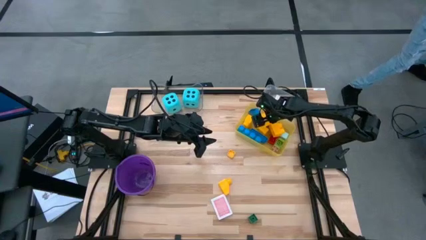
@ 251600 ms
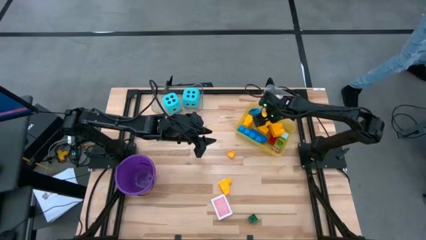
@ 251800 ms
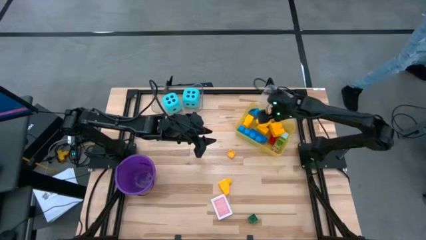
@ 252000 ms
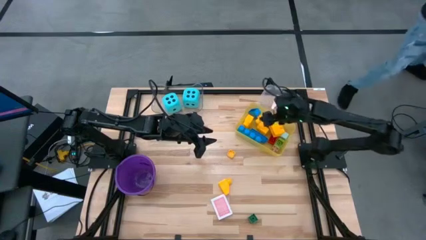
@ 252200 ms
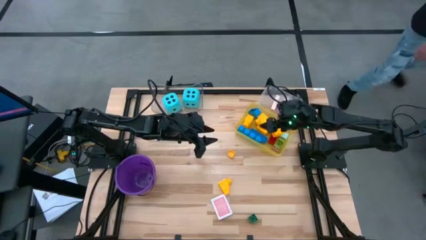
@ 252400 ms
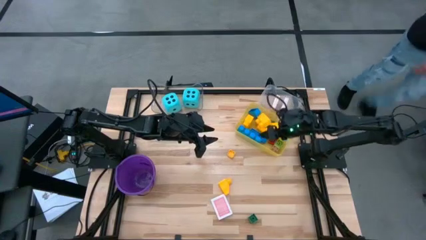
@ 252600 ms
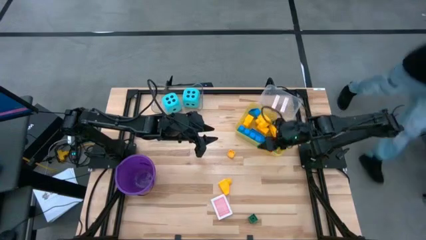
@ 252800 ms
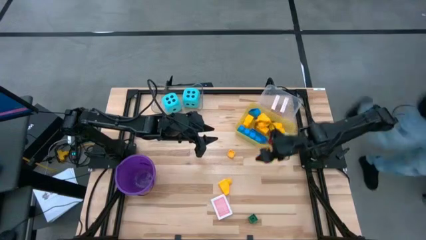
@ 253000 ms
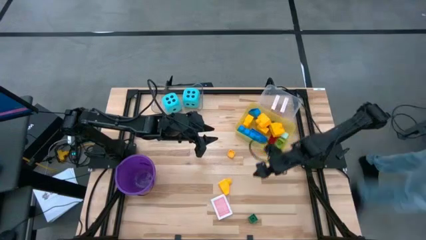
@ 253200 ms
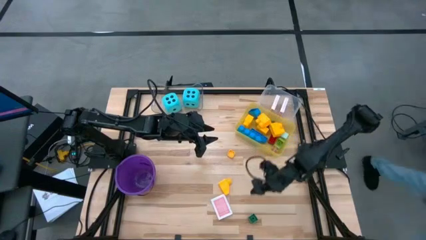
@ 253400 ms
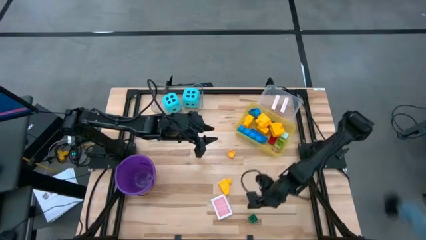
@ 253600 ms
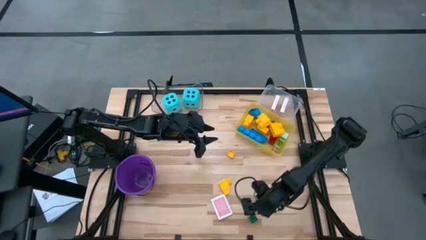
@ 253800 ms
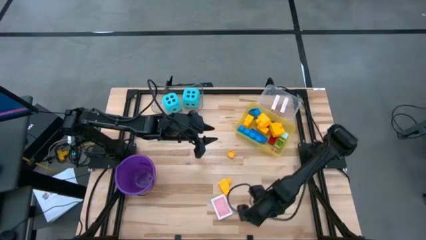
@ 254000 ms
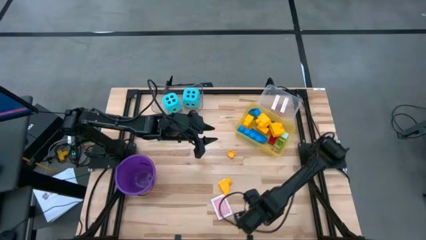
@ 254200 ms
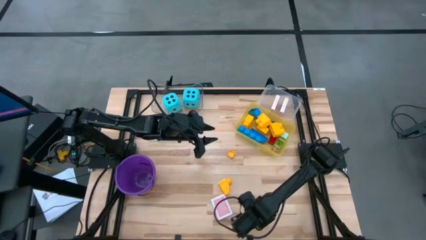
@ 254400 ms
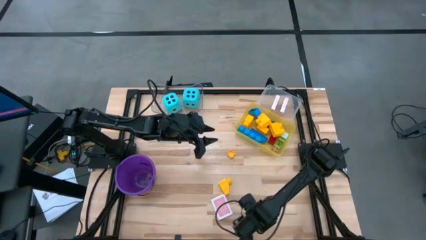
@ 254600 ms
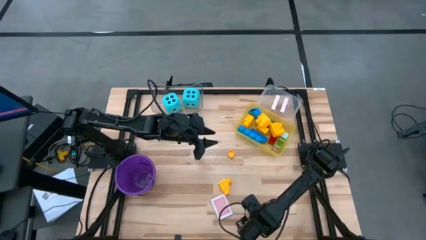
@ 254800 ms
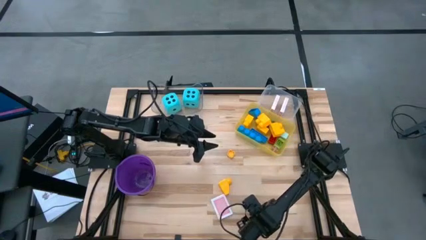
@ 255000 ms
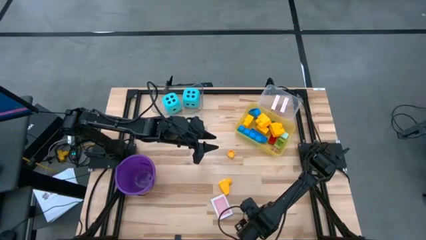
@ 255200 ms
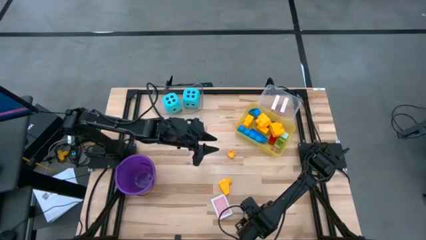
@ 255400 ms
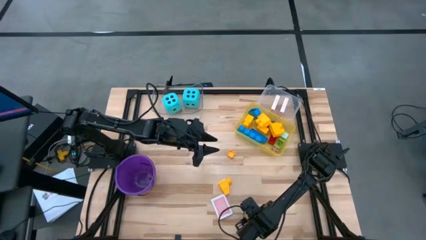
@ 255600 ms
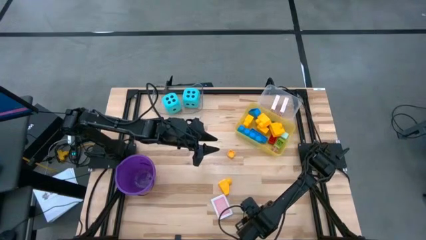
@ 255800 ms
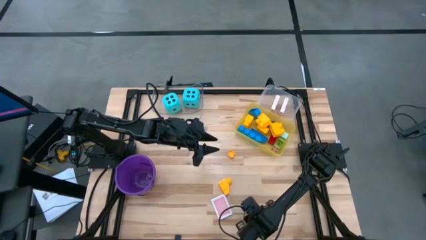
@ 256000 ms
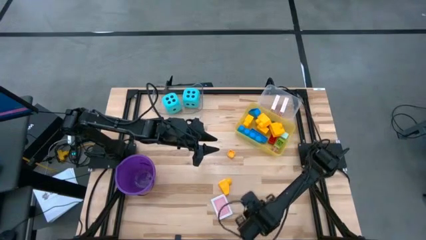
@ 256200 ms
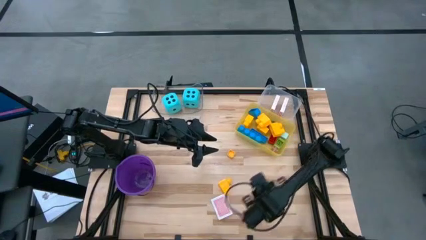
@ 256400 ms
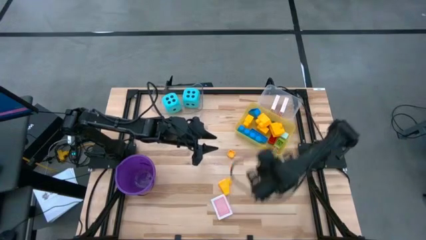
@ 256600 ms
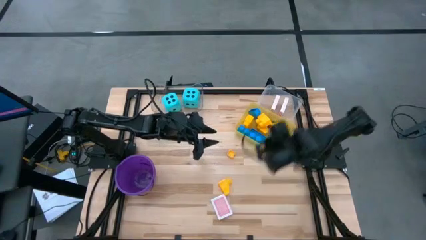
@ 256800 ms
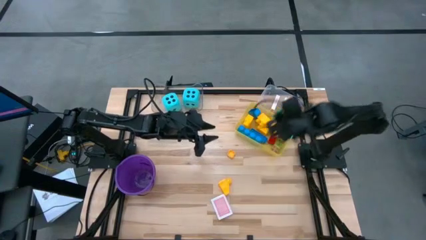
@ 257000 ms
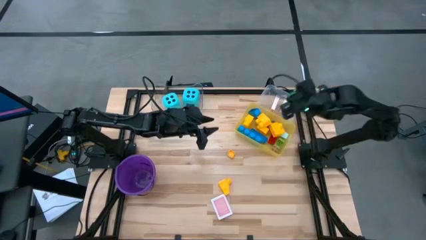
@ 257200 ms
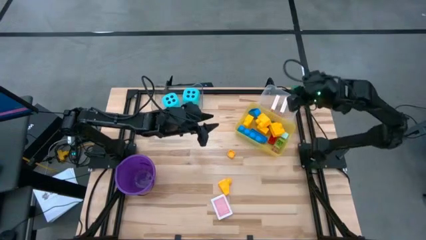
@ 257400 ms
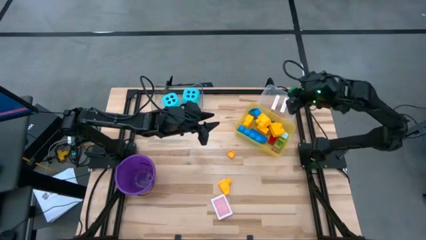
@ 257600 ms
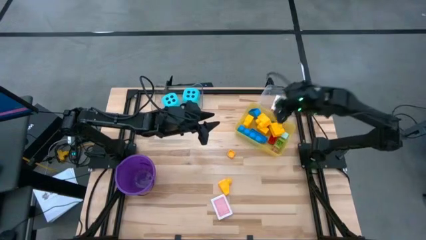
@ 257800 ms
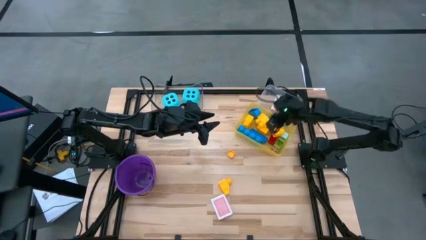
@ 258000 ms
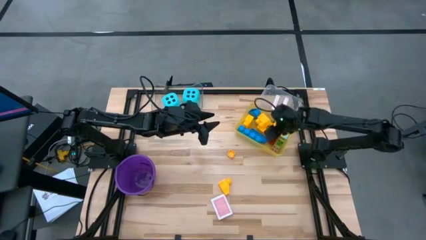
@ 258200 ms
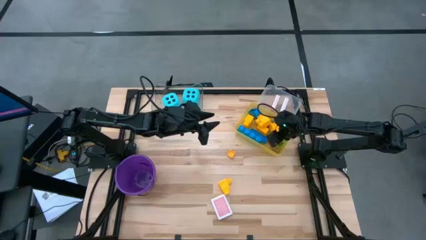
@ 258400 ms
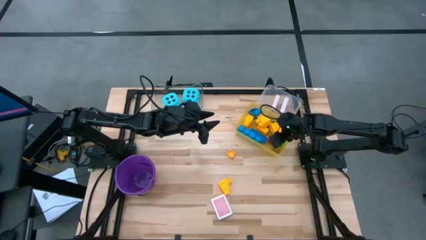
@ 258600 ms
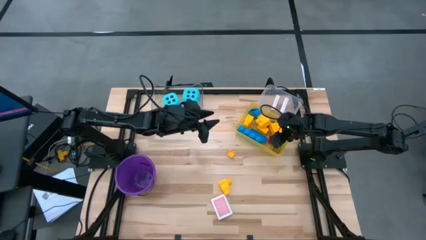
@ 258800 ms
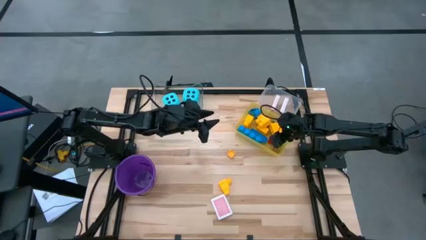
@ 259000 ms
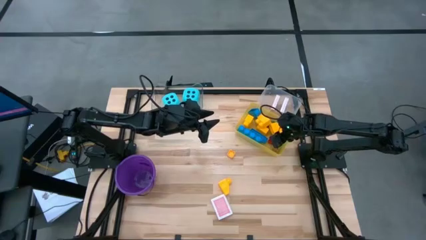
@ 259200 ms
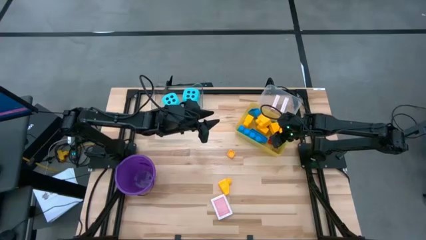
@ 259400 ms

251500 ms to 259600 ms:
Task: Pick & Place Toys
Put the green game piece into the yellow bin

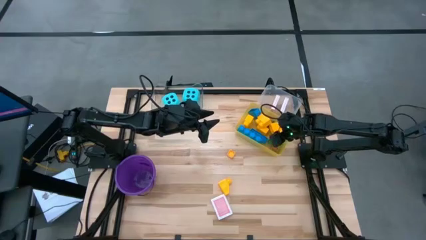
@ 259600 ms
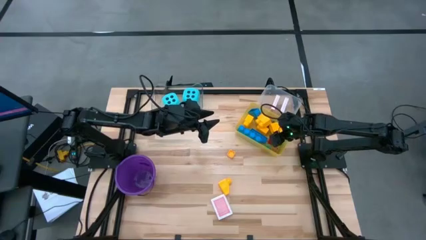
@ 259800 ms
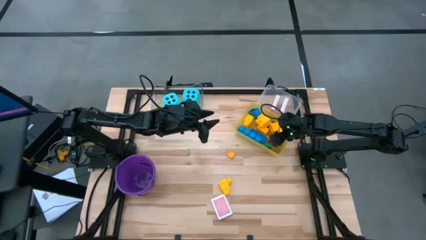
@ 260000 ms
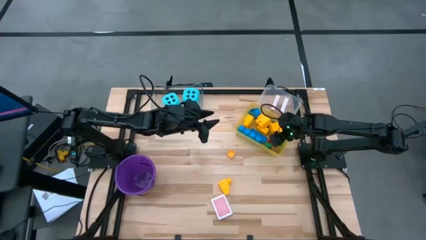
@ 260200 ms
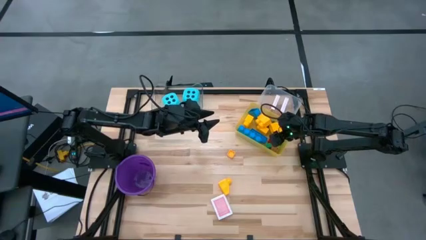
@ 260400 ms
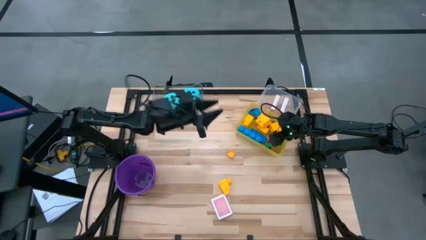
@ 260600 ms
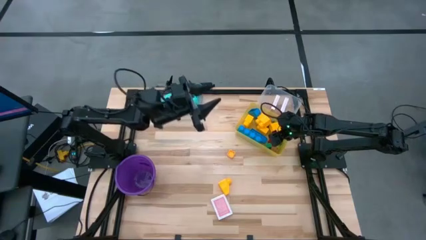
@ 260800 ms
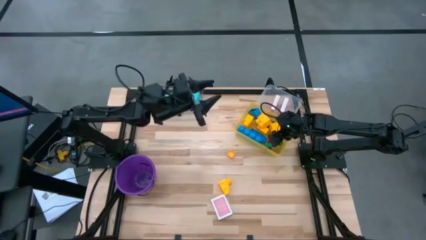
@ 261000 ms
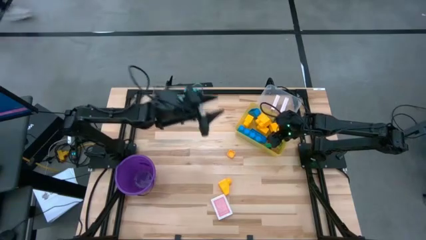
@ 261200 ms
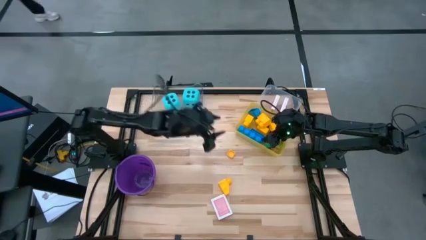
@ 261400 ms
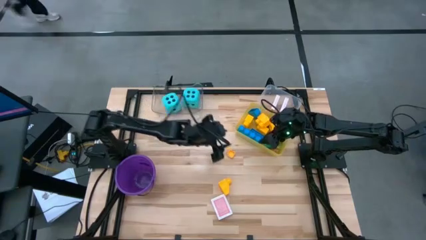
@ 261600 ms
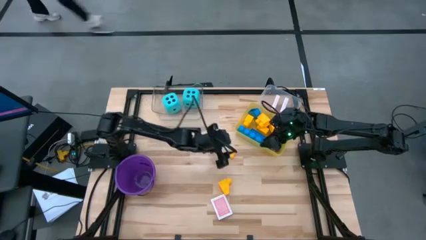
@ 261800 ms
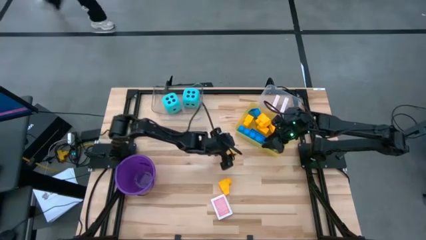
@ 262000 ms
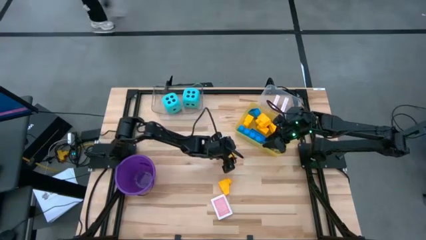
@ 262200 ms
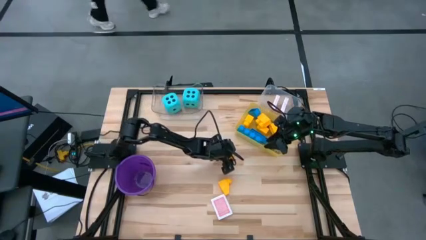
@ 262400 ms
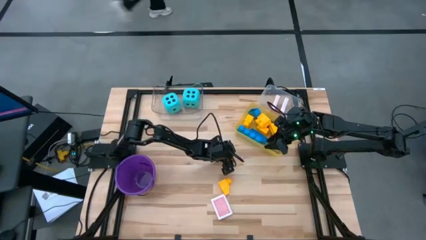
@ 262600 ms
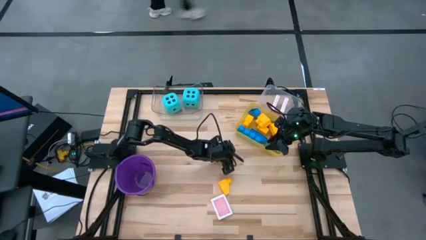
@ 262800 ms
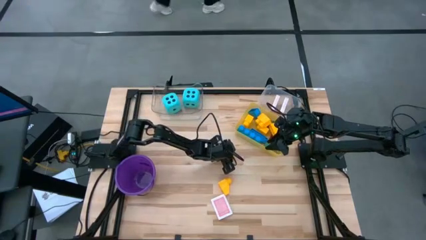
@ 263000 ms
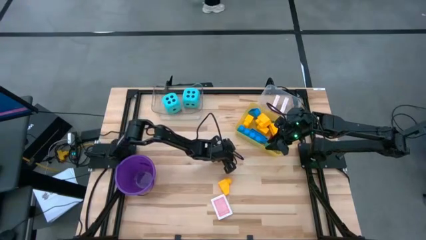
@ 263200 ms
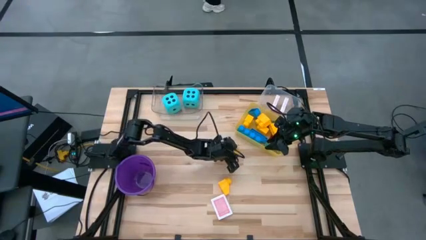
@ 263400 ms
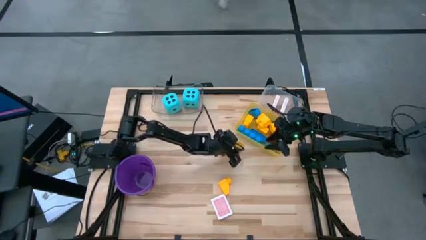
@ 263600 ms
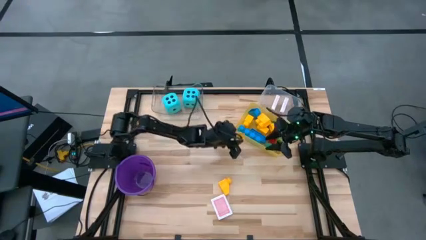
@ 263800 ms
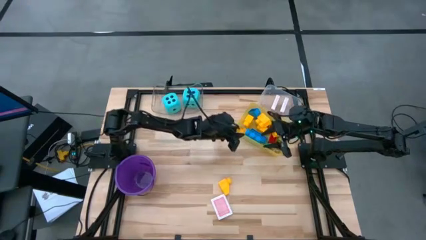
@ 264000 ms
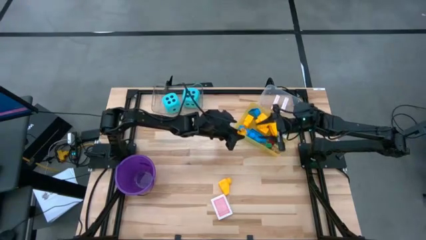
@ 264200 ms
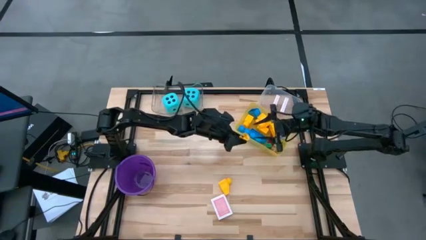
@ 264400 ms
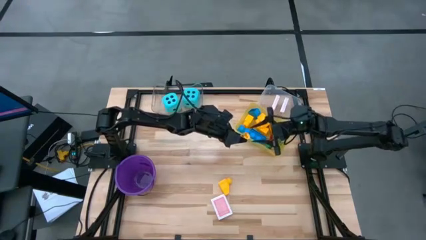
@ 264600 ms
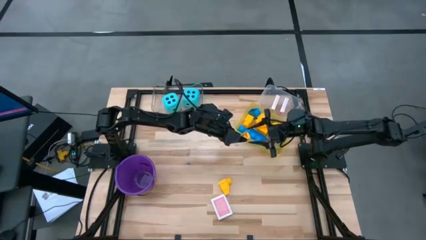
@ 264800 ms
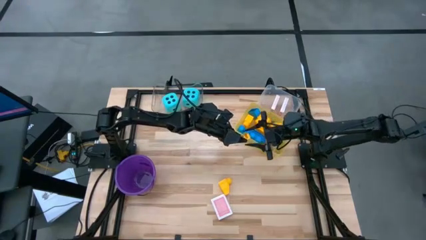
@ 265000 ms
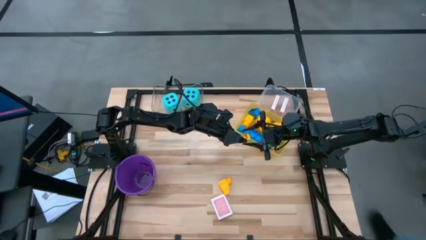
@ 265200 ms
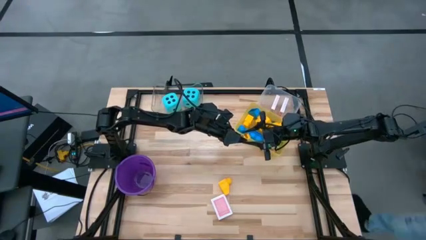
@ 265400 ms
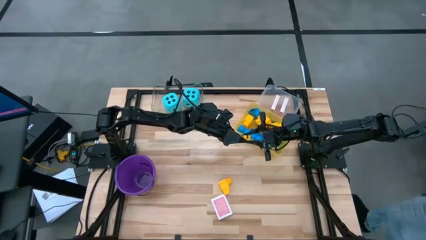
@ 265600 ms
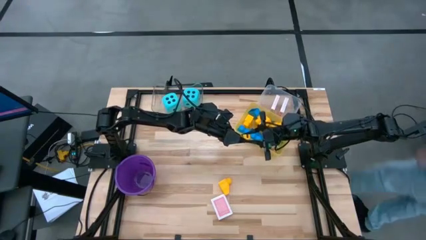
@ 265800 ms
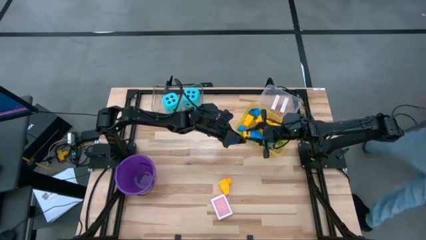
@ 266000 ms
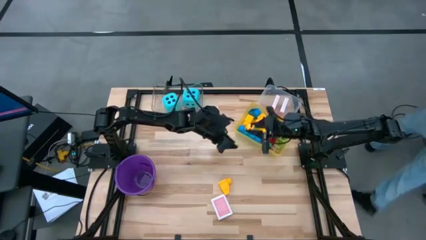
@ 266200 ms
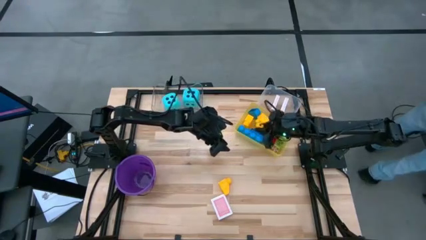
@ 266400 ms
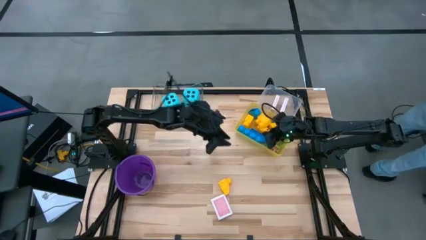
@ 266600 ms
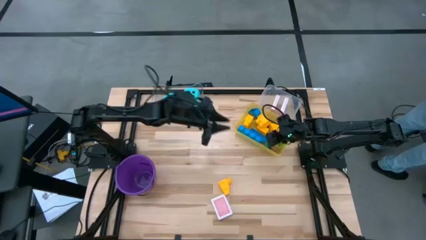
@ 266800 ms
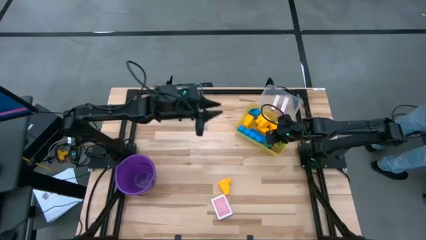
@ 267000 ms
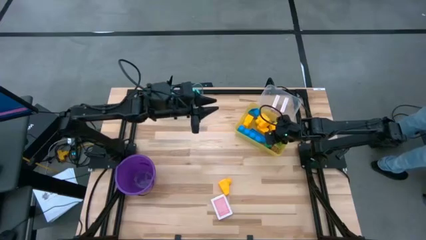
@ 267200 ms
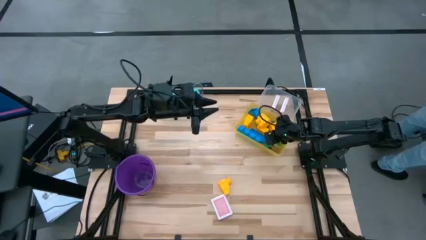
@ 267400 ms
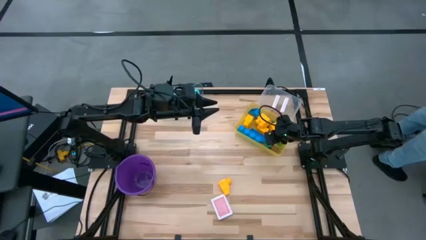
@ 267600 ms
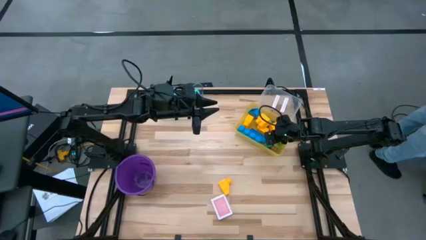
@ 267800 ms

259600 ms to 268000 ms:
Put the yellow game piece into the yellow bin
